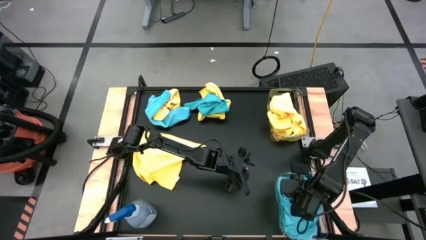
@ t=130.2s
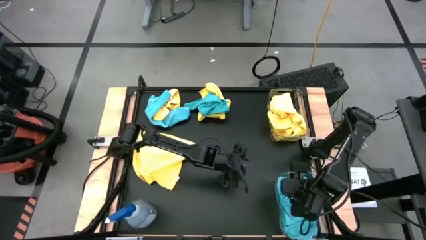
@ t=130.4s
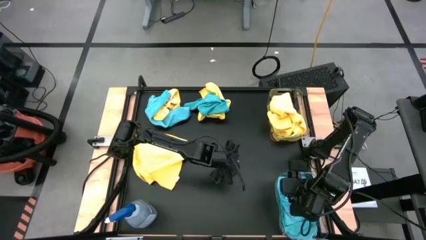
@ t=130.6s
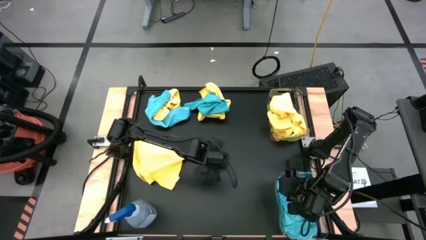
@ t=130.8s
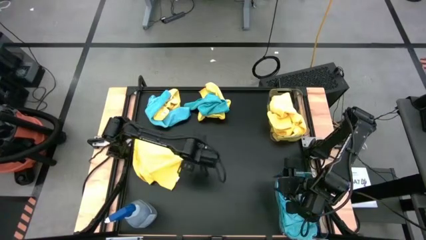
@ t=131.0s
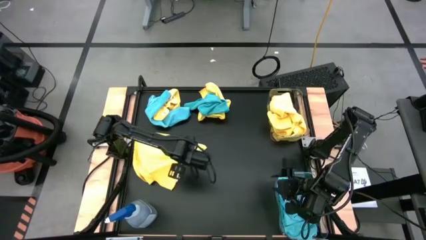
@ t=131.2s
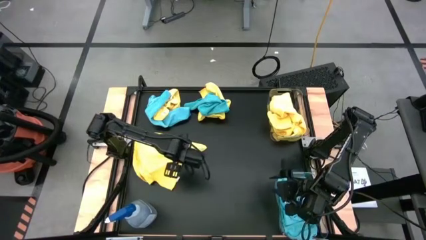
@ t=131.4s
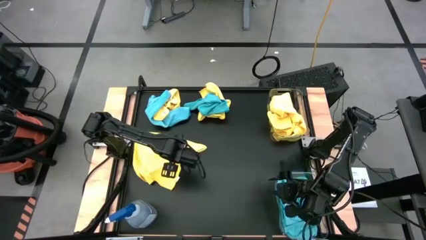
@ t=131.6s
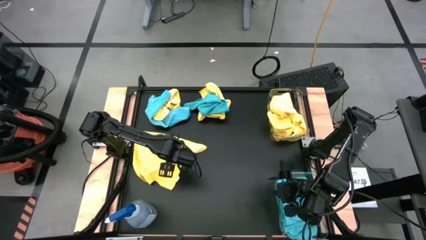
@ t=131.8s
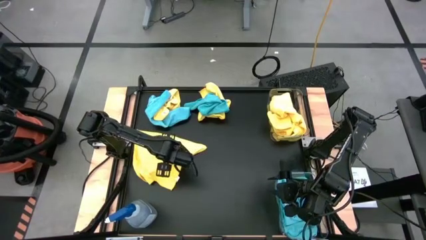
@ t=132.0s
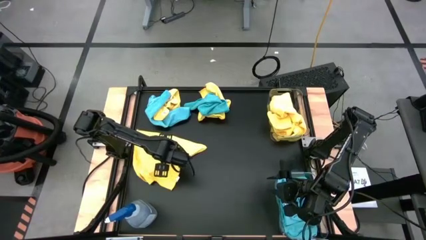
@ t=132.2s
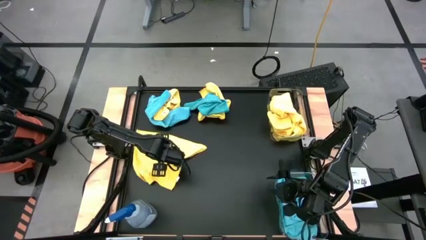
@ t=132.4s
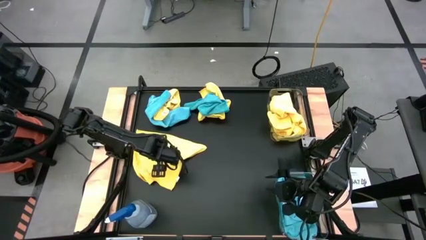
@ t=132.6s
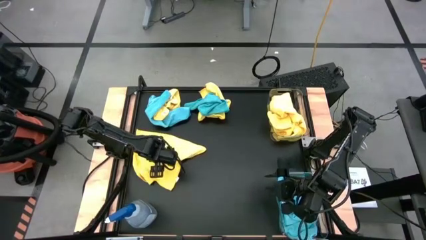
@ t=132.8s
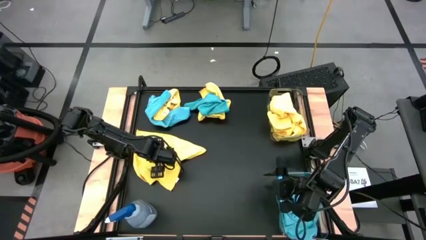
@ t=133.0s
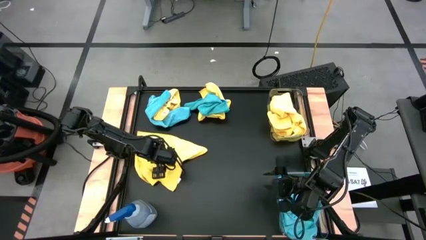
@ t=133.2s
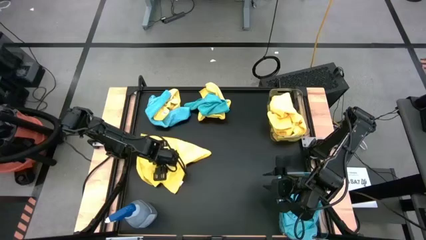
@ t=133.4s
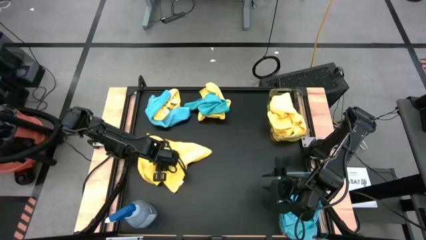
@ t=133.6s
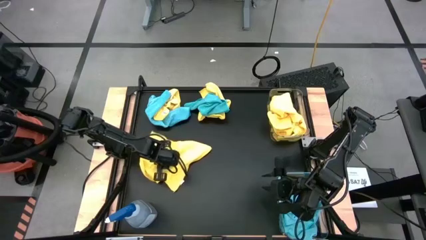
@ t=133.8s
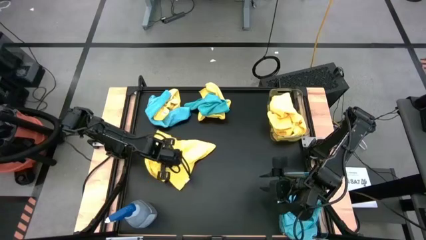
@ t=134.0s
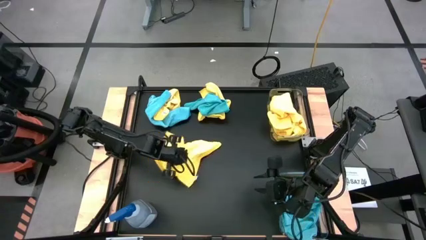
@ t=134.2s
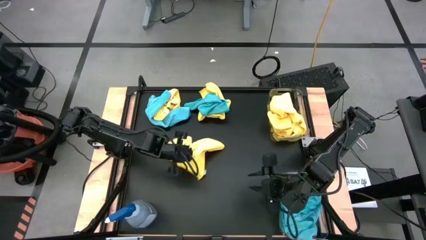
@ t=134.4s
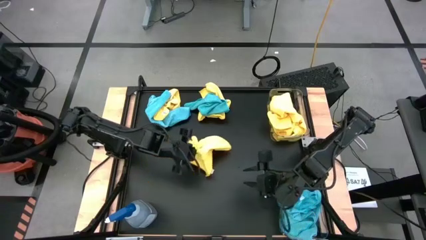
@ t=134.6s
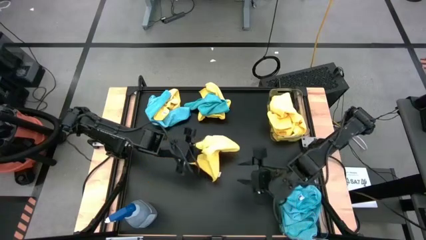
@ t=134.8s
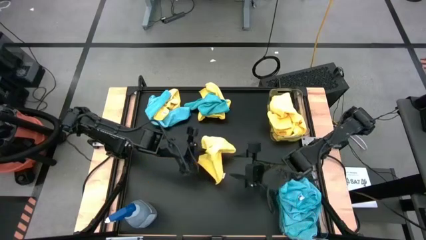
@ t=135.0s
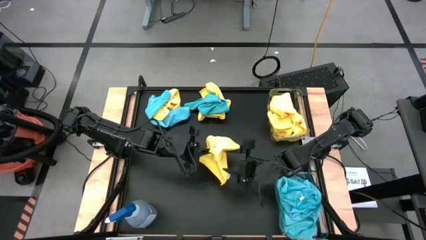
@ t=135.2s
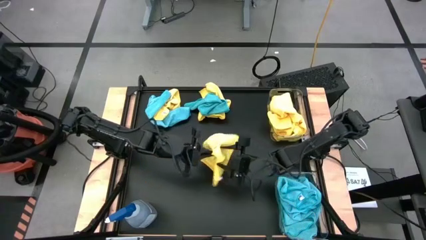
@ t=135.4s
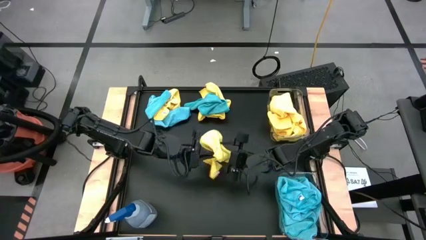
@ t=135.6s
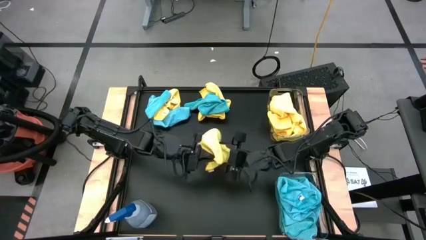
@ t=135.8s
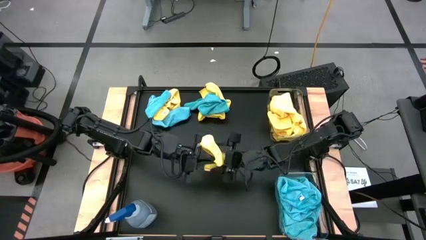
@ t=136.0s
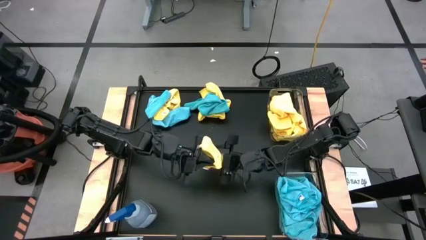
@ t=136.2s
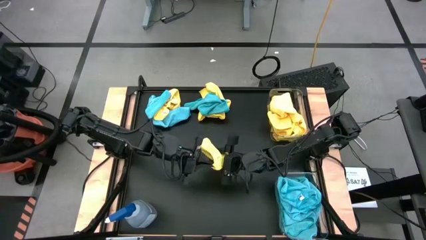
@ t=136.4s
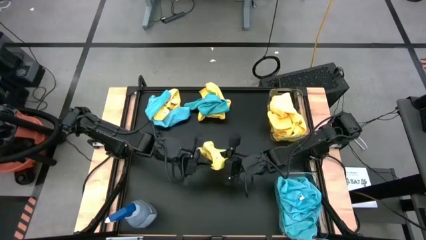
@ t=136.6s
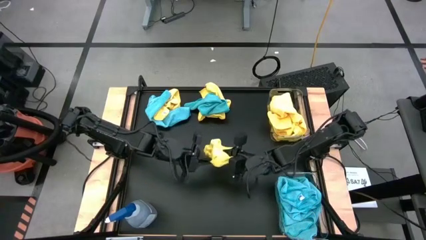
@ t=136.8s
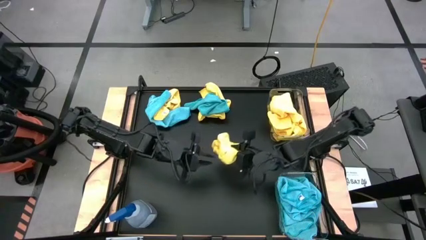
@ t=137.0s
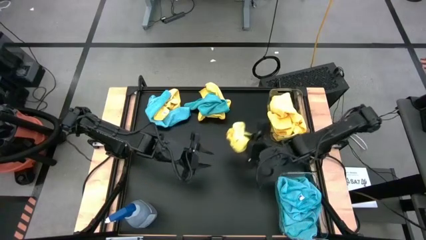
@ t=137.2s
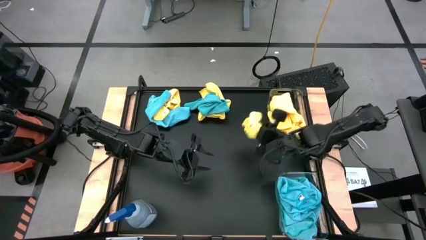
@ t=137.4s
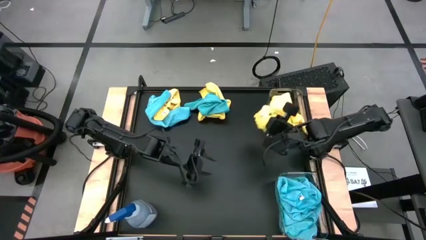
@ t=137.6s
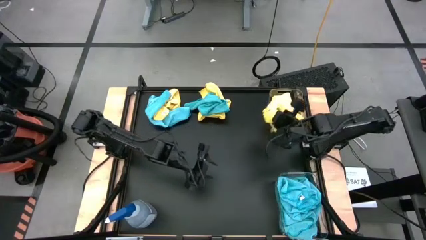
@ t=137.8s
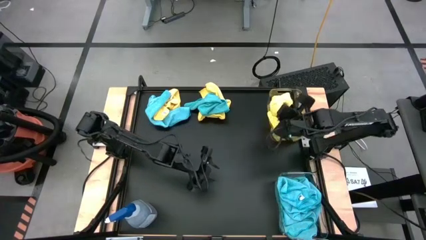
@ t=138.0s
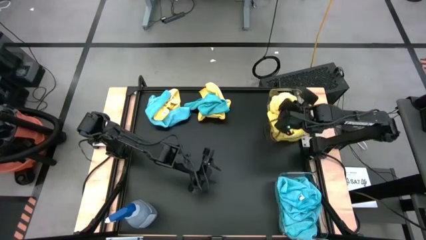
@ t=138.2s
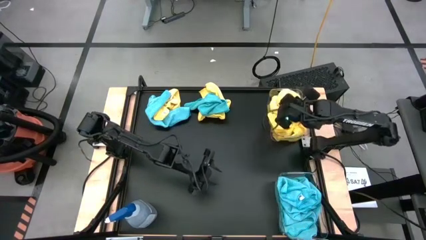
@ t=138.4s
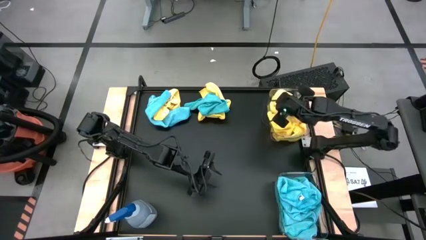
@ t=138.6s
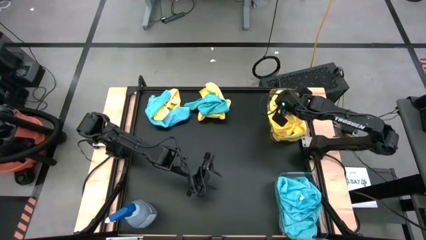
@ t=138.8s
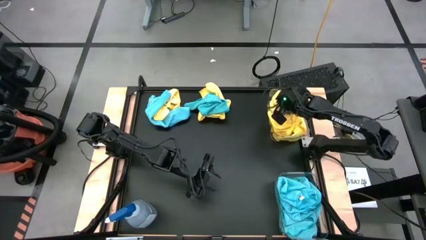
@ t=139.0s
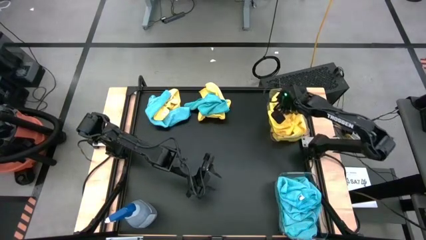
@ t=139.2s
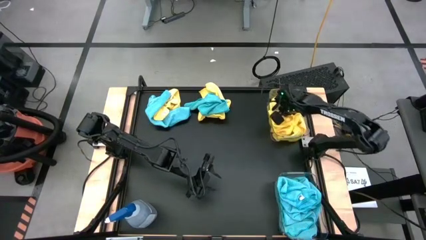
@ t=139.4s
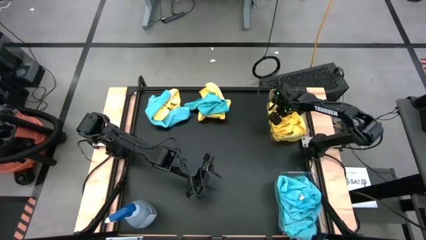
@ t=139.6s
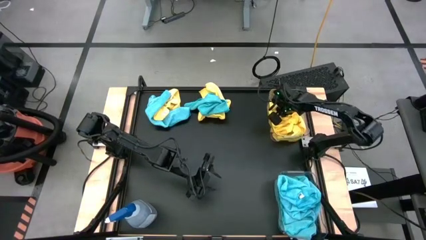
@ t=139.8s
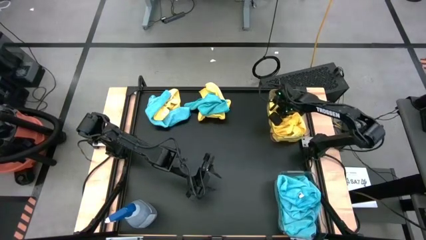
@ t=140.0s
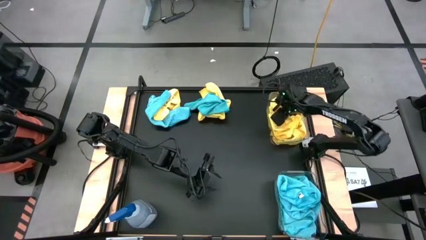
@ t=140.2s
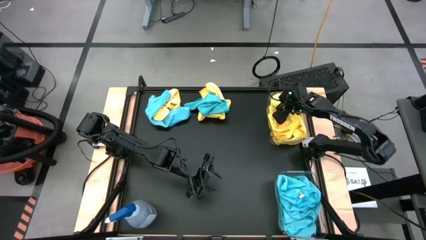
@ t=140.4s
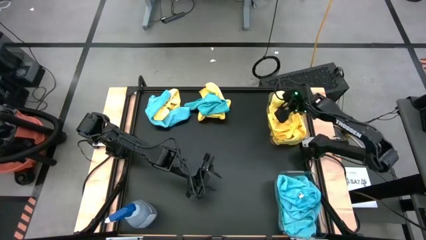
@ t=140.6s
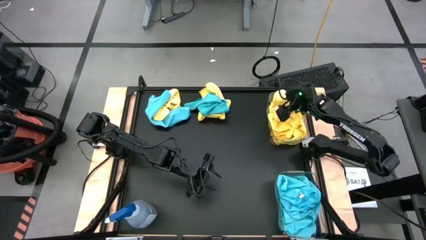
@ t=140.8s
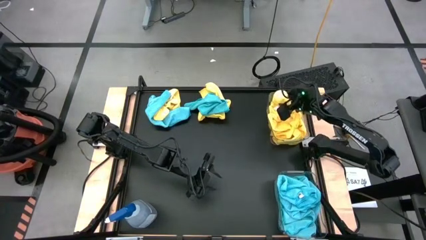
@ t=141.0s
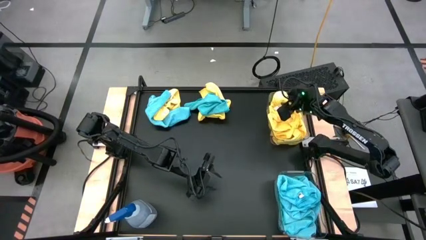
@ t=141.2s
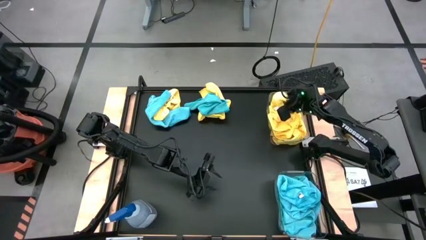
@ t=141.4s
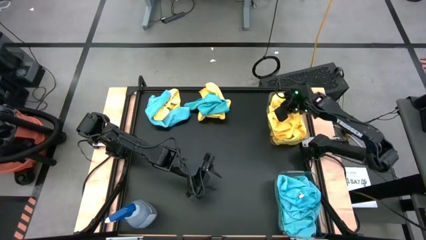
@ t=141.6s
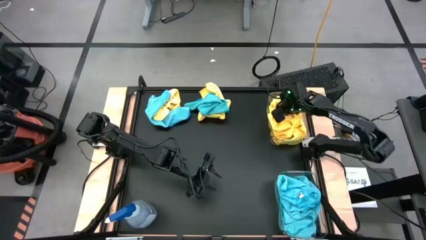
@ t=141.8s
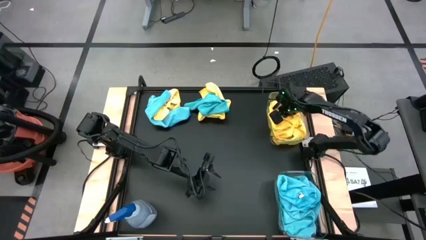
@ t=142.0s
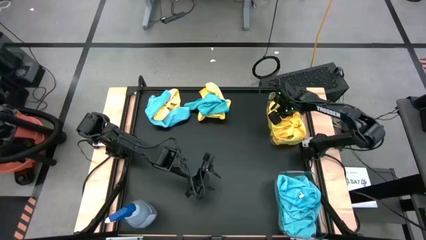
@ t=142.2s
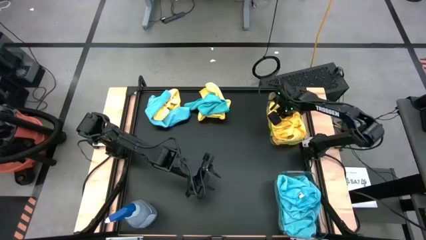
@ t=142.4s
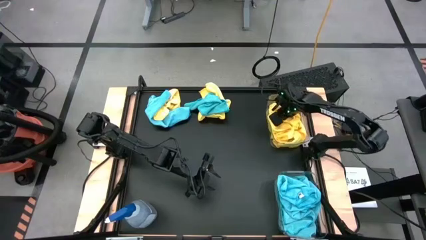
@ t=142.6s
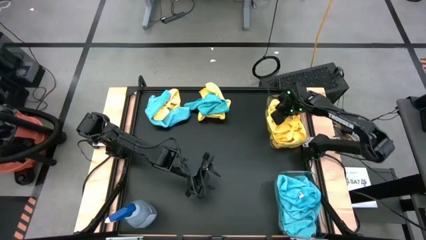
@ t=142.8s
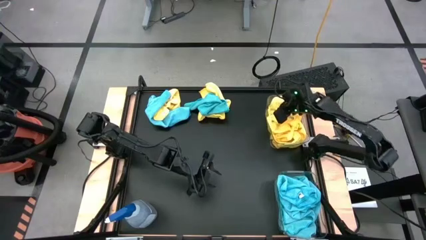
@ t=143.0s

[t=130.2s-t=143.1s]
Task: Sort microfiber towel by color & place in baskets
Put the yellow towel into the top transparent bin

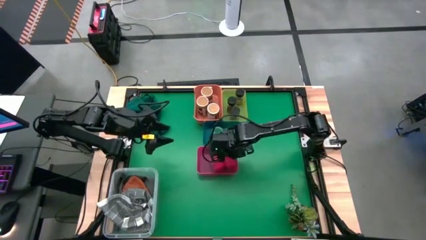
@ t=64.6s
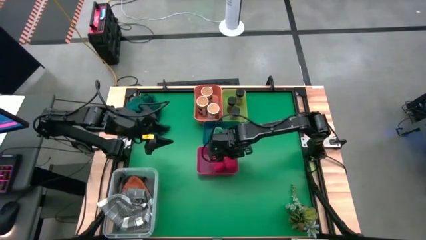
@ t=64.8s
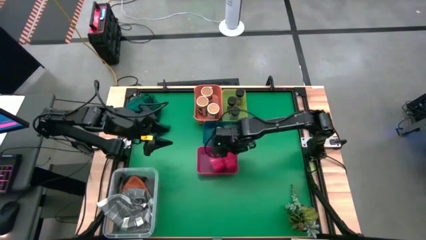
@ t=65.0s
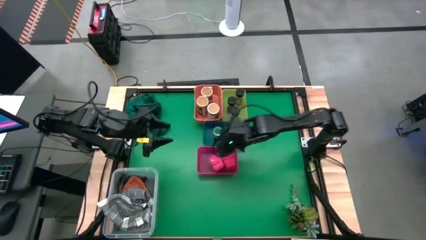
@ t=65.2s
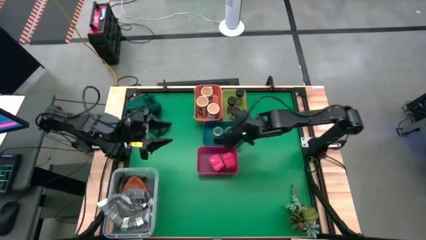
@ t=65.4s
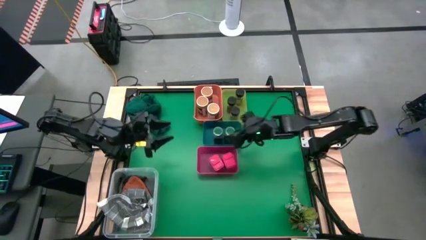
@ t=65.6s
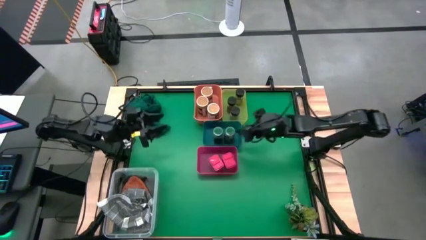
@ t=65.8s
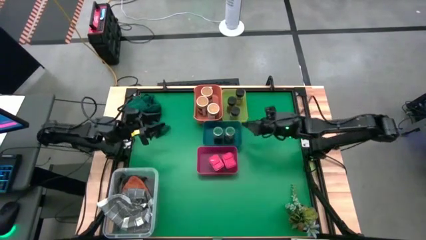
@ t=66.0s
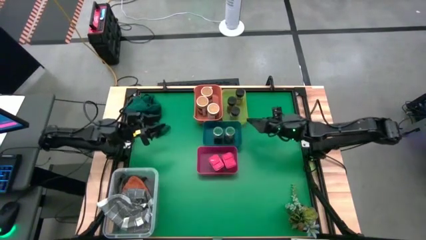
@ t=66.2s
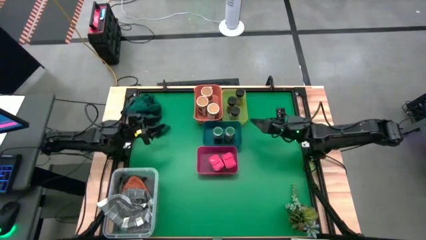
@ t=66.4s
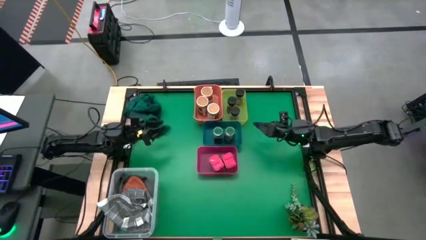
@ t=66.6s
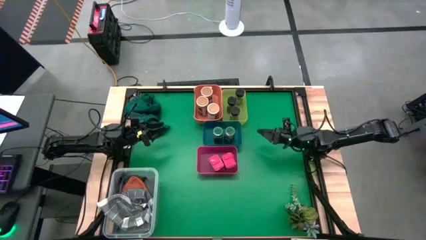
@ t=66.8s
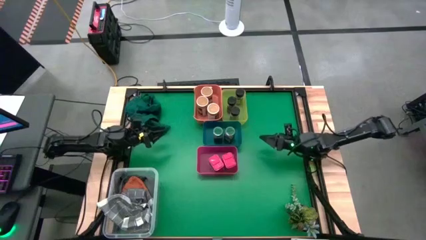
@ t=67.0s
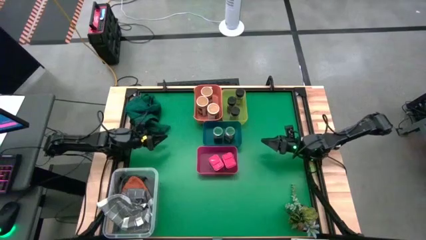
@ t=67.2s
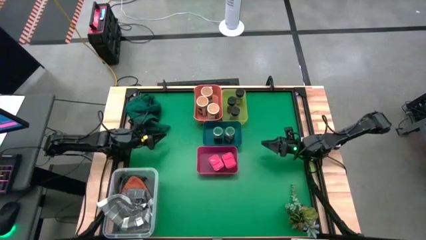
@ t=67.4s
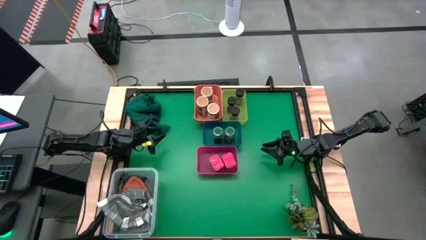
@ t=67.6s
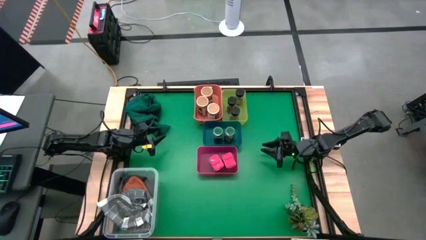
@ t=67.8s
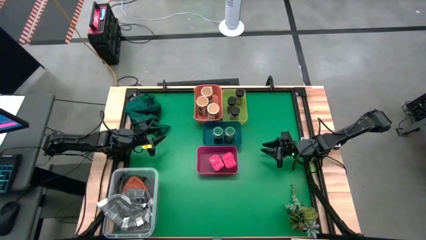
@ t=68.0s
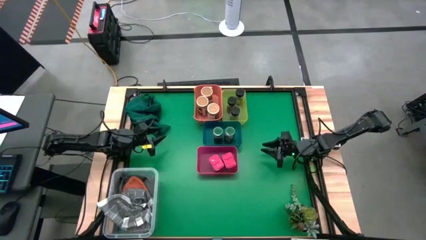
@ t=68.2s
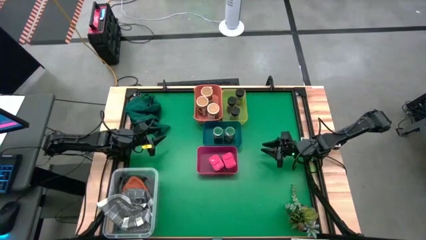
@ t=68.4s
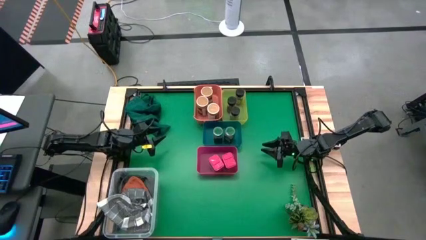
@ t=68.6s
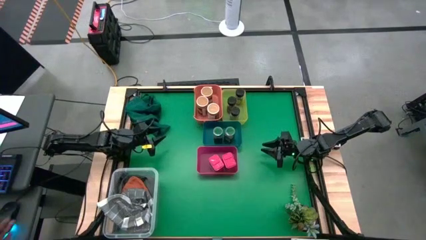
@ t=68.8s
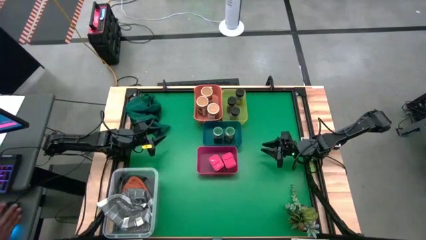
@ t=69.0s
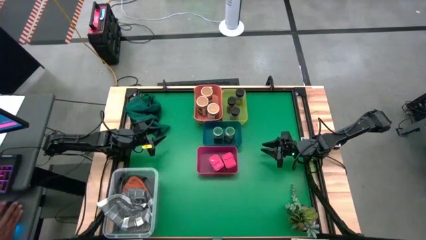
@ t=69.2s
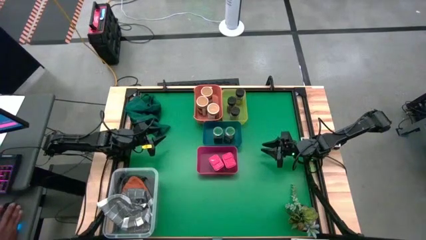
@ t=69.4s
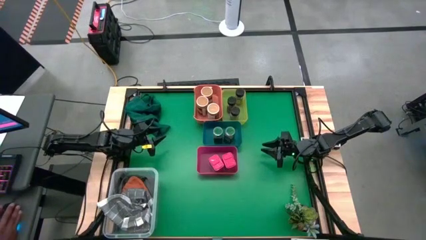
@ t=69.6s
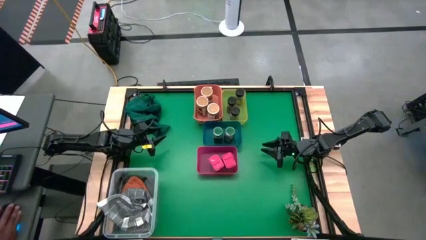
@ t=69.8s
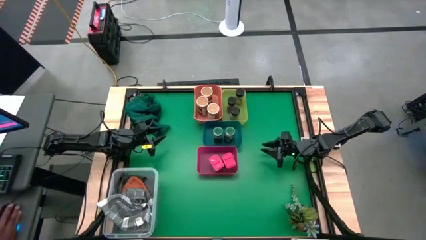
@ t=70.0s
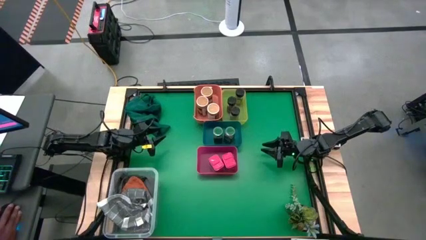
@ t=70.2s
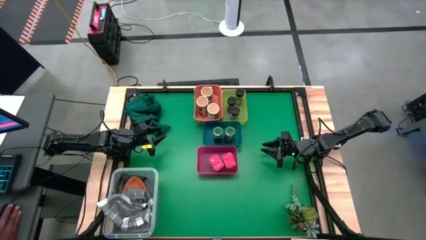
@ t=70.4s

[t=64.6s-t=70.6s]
Task: Sort spices by type
Return to Home Position
